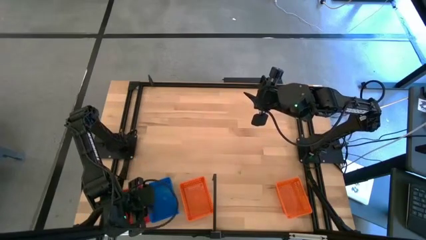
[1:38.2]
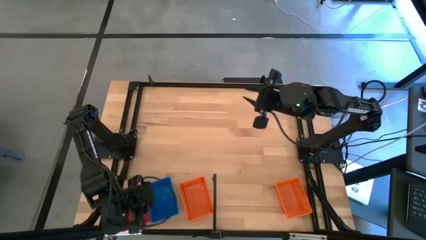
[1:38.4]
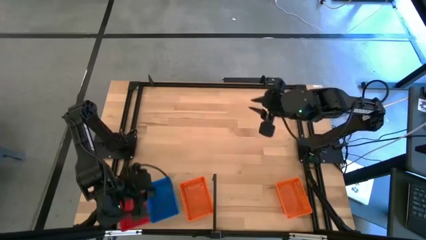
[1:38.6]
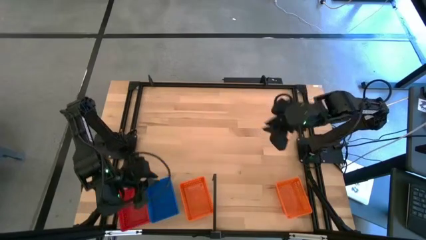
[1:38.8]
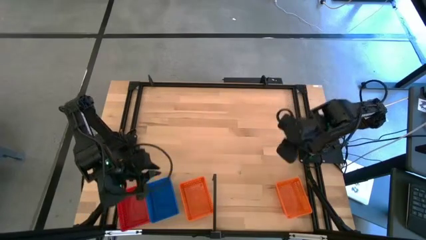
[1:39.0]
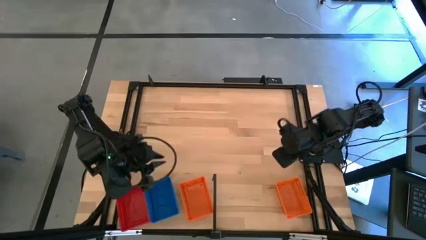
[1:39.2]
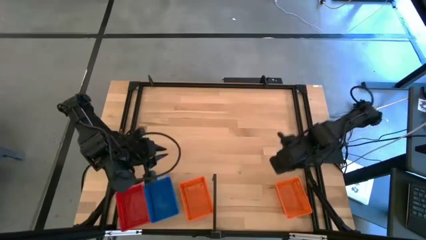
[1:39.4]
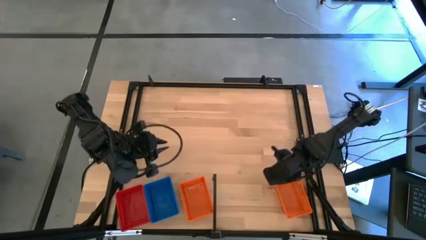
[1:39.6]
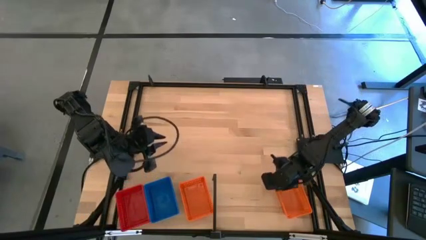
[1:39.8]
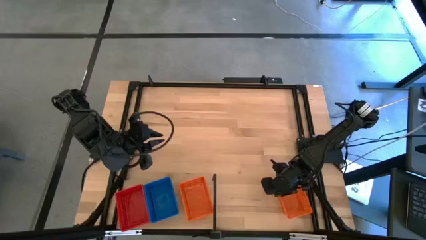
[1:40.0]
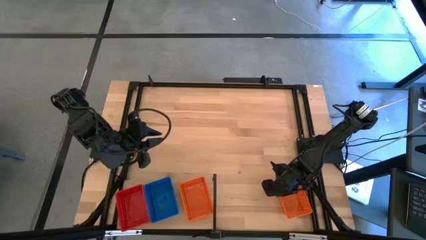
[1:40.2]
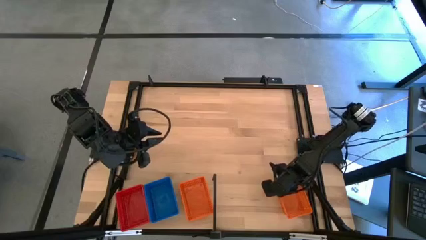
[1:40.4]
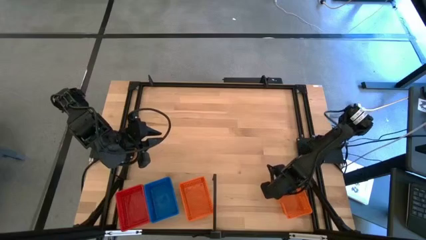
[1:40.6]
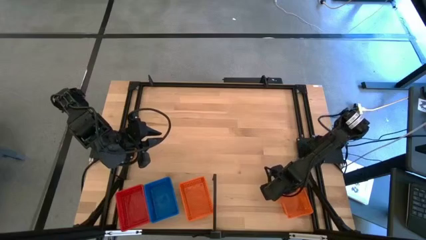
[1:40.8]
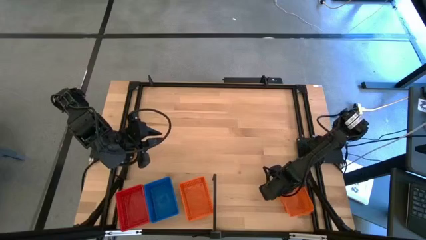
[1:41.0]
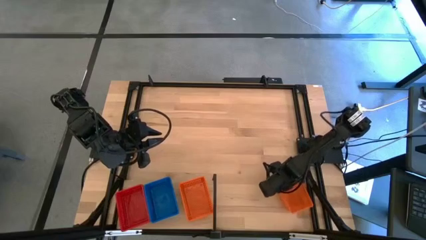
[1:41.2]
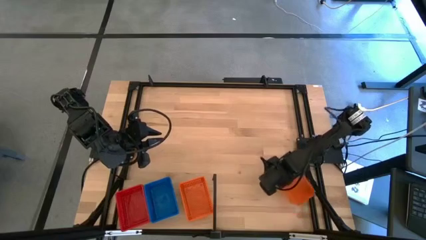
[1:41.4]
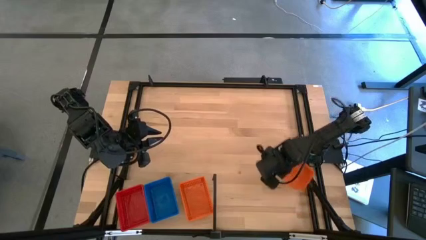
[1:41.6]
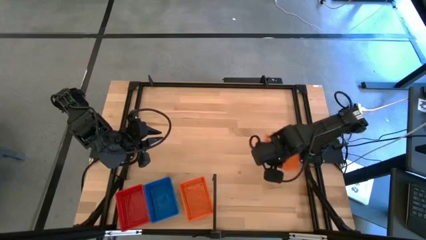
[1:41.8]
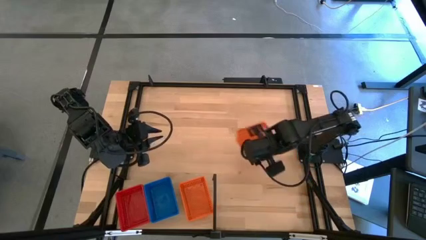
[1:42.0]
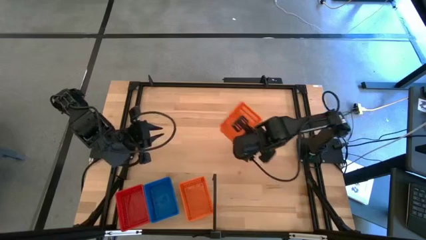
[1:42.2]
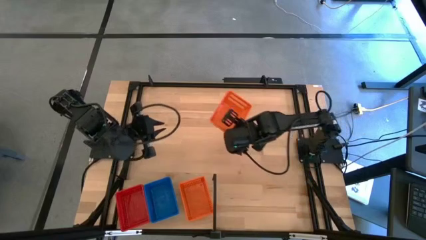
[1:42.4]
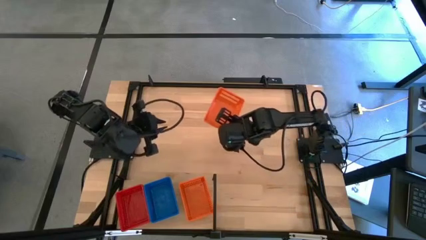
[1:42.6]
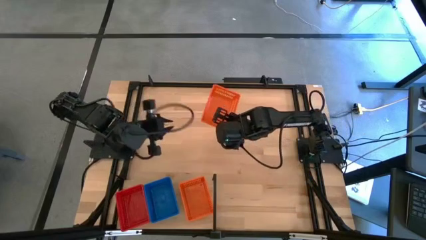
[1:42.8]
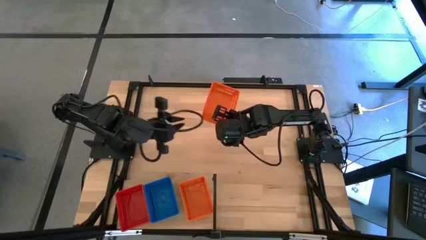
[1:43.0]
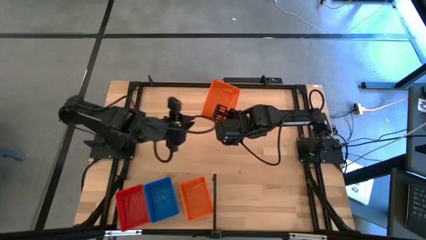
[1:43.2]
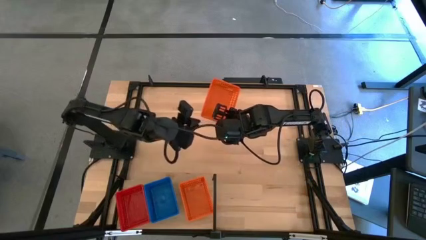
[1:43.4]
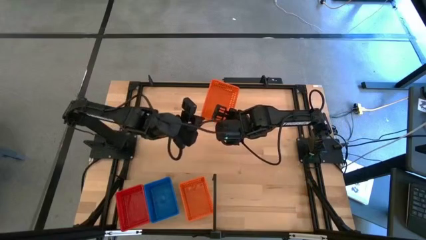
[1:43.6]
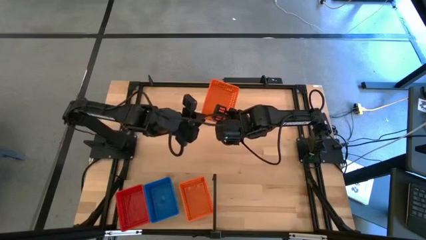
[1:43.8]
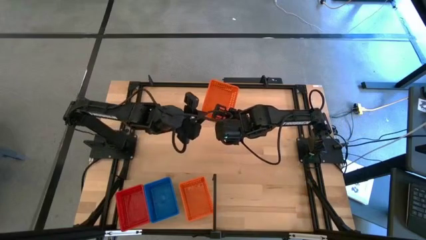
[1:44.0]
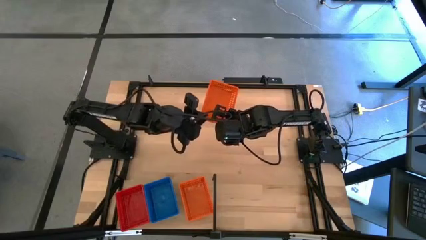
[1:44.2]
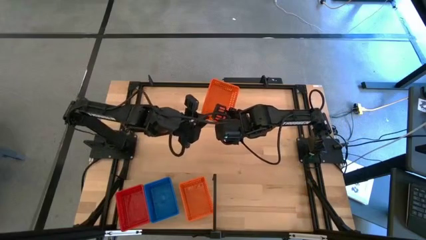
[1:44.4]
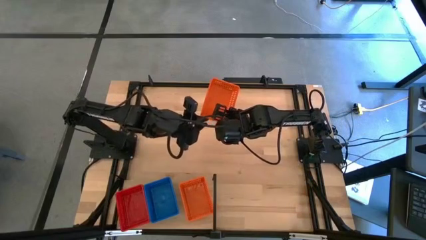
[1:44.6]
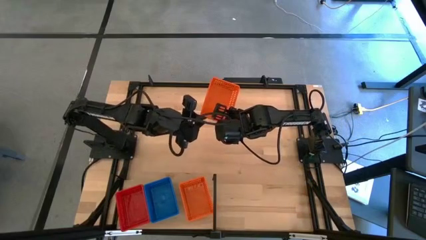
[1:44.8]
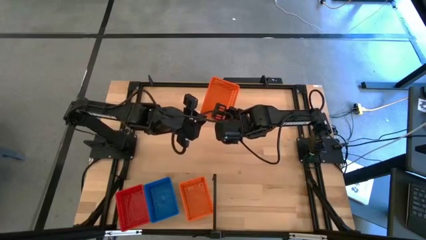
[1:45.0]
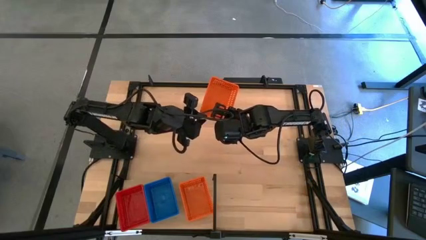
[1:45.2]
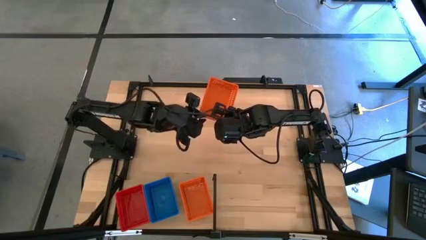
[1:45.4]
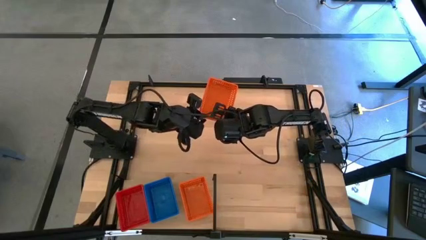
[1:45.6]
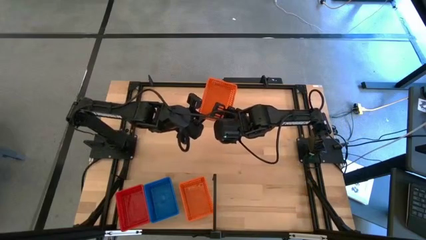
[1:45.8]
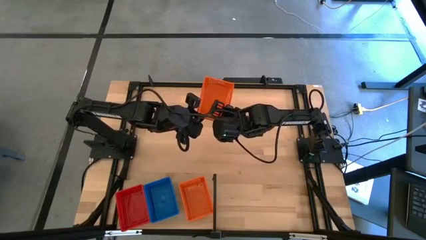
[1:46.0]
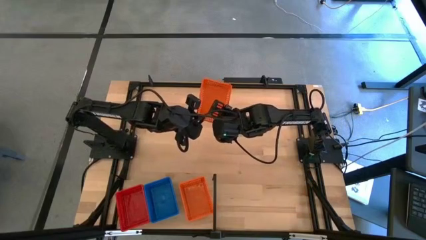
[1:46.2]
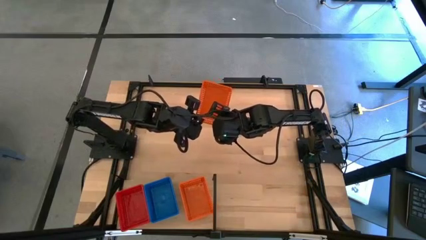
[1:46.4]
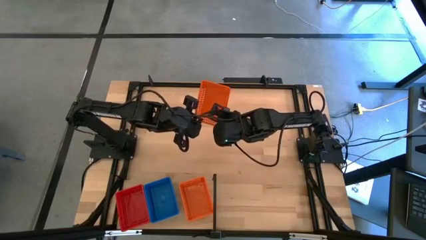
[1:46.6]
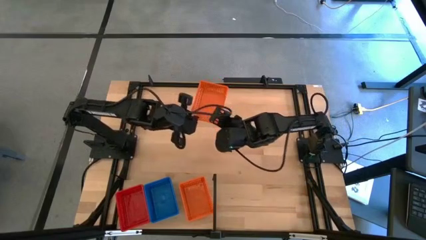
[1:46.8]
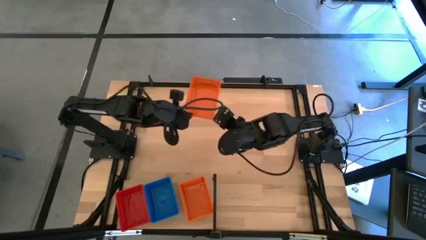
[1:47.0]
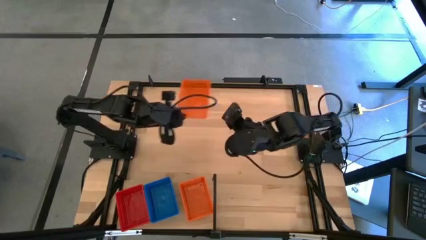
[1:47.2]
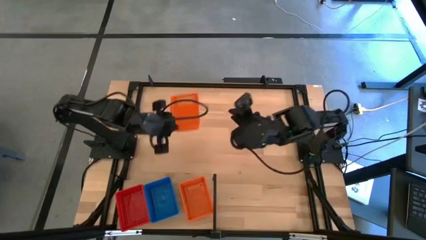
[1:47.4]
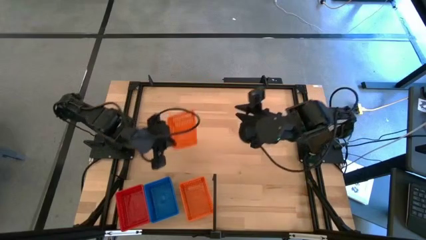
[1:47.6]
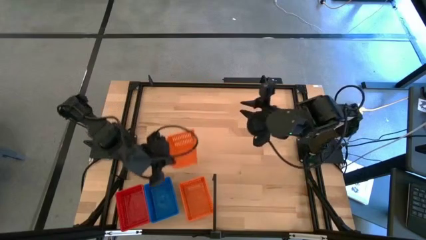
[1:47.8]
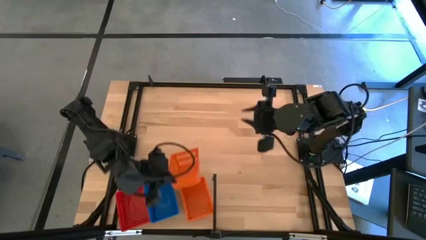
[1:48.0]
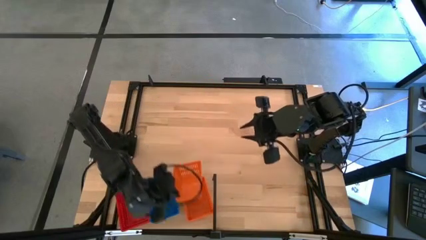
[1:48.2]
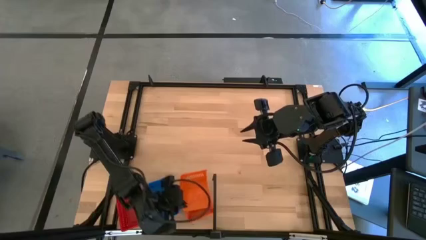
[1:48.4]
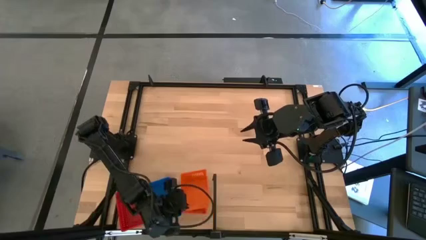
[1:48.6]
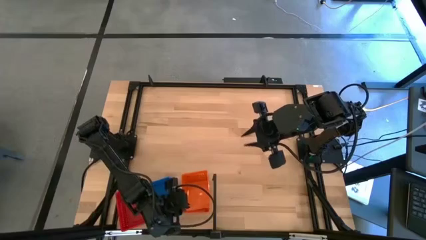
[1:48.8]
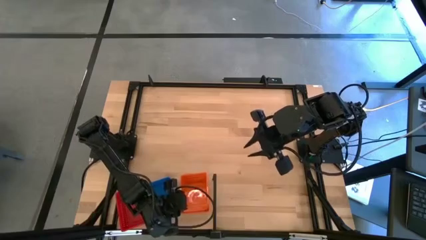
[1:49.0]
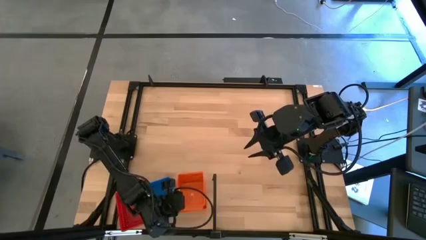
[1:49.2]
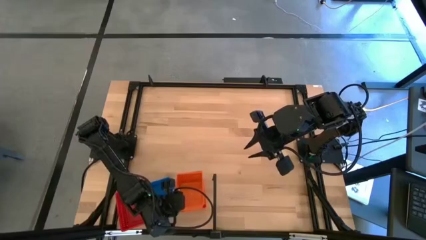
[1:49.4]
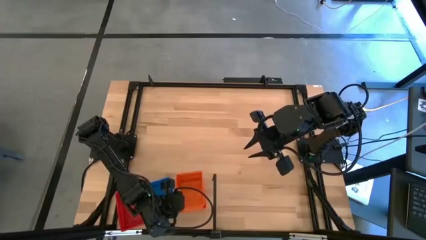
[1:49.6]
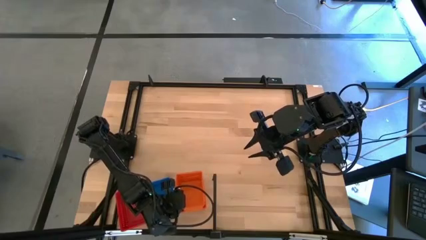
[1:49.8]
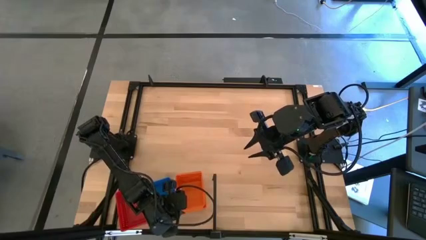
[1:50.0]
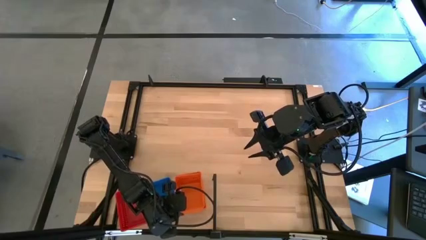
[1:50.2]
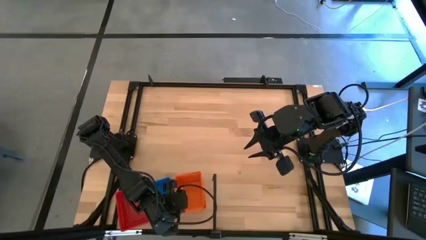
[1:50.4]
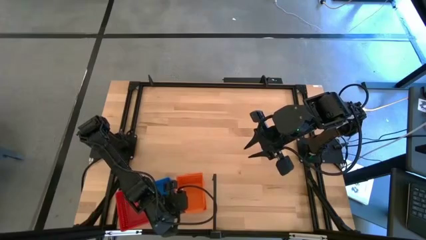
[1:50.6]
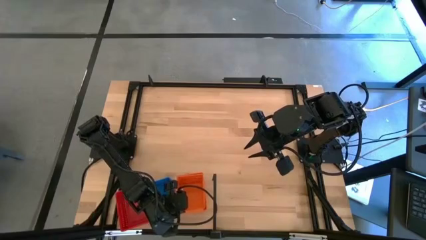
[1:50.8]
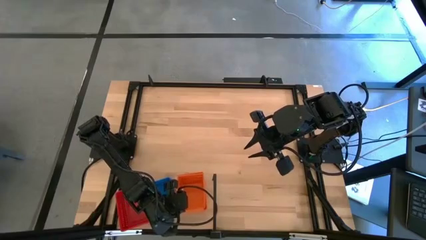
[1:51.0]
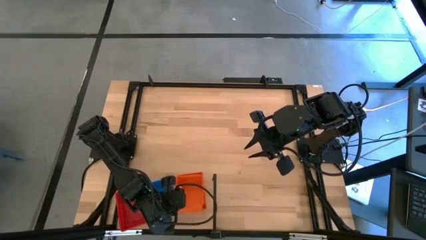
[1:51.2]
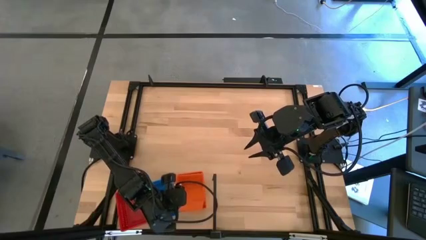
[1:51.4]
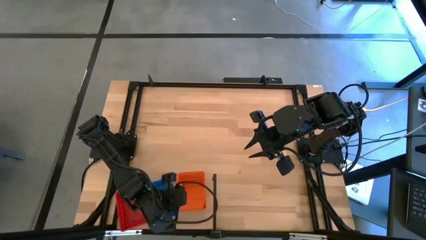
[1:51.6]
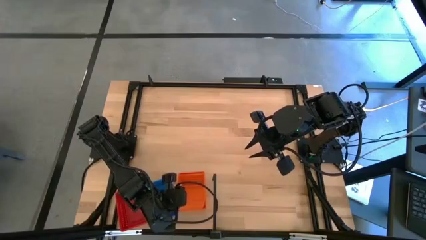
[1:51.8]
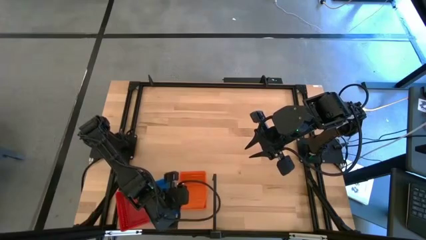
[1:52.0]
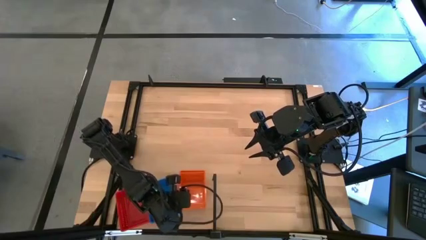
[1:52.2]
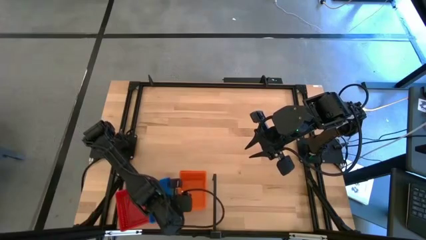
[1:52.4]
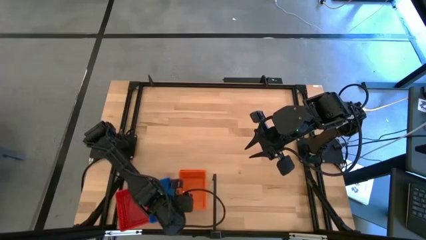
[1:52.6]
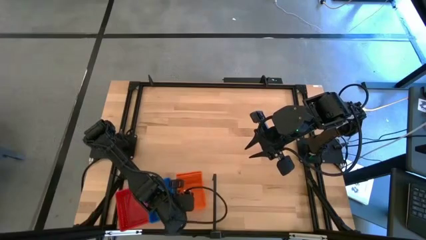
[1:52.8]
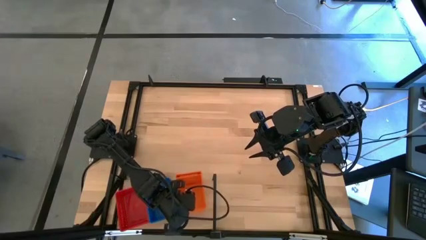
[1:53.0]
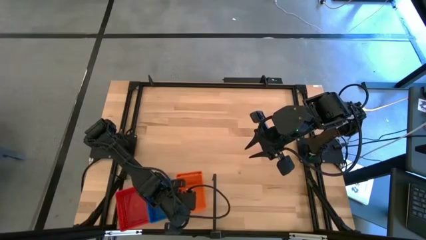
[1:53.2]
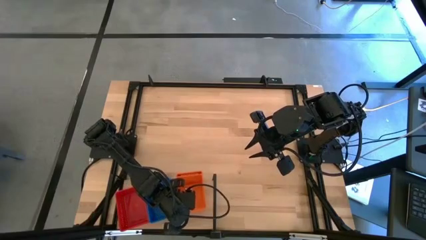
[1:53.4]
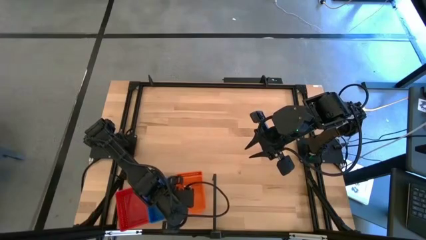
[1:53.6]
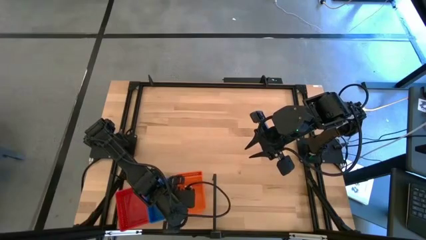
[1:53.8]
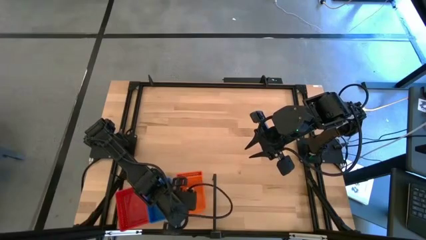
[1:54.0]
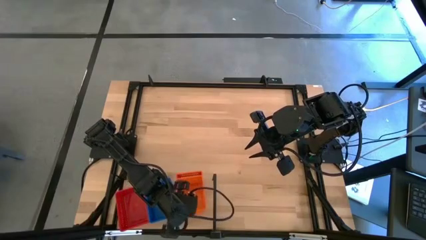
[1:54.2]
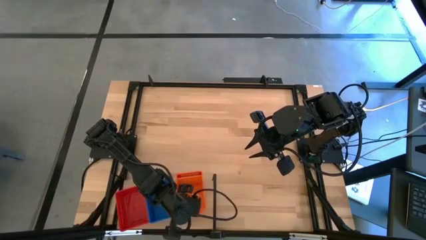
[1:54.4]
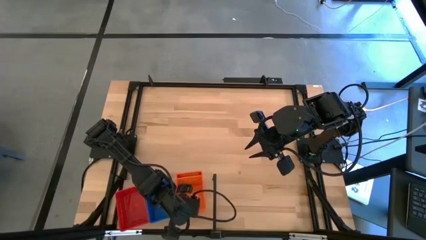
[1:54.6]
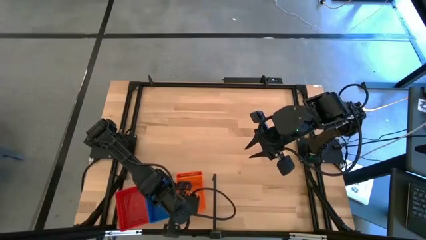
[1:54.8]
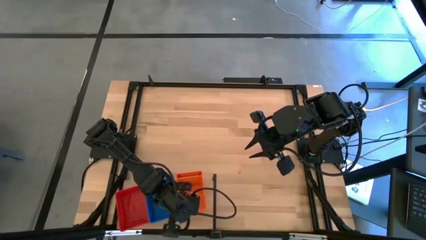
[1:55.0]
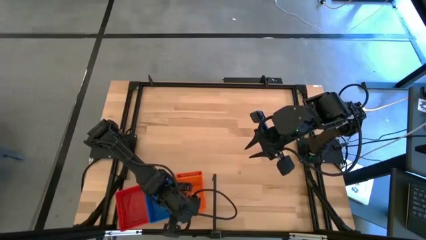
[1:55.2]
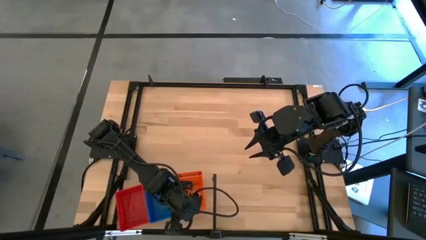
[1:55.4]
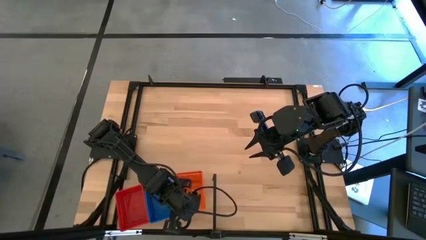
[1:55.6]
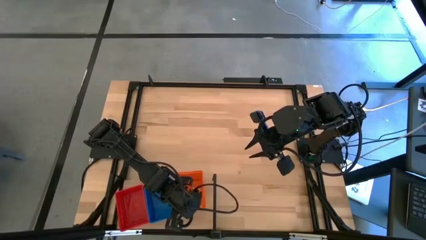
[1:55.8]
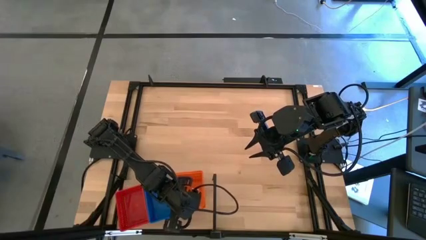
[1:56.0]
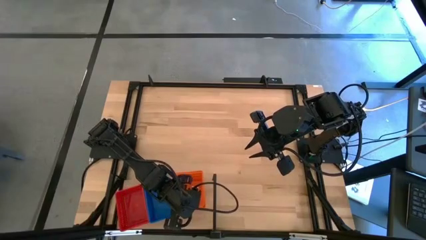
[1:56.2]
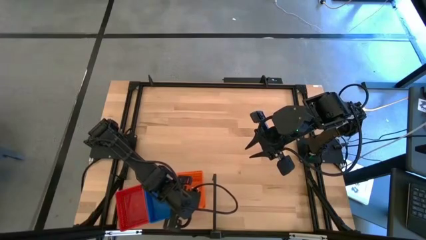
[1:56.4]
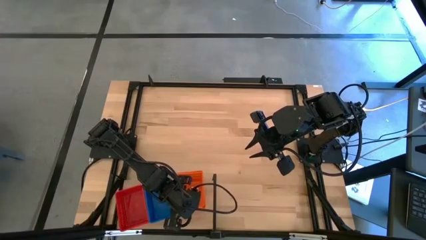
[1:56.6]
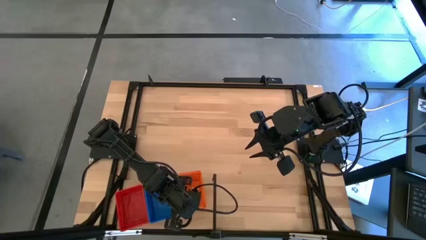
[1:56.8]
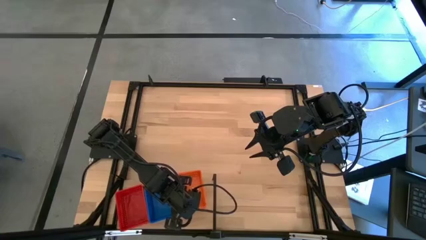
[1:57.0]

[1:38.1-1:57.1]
Task: Stack baskets on shelf by color
Stack the orange bin on top of the orange bin on the shelf
